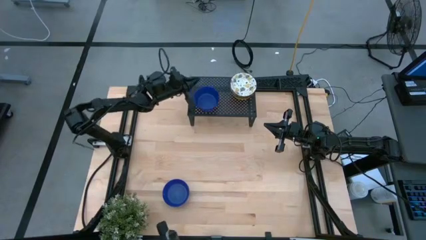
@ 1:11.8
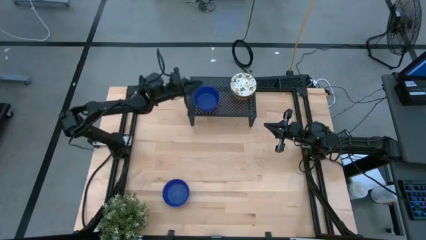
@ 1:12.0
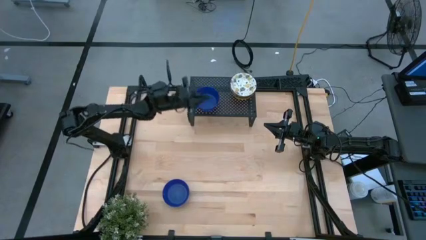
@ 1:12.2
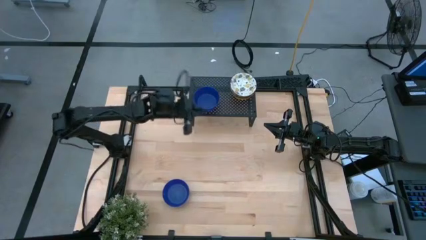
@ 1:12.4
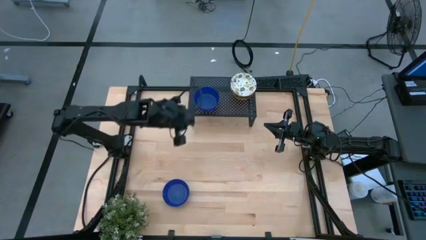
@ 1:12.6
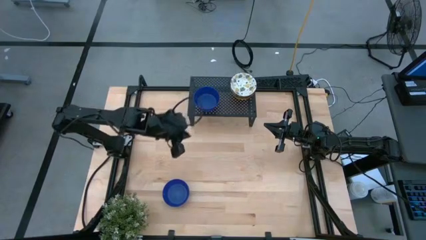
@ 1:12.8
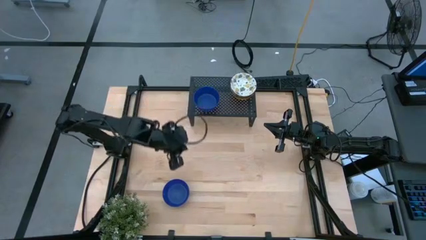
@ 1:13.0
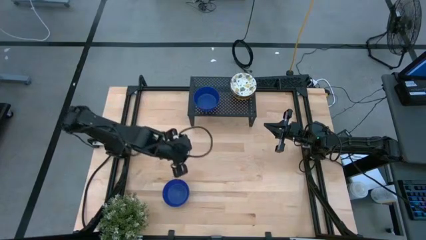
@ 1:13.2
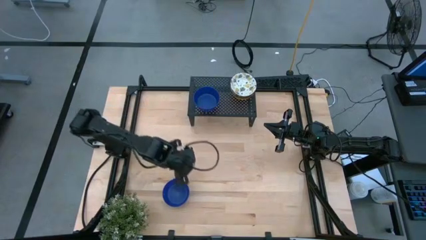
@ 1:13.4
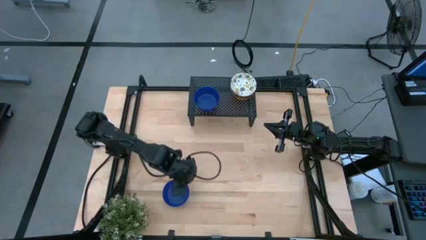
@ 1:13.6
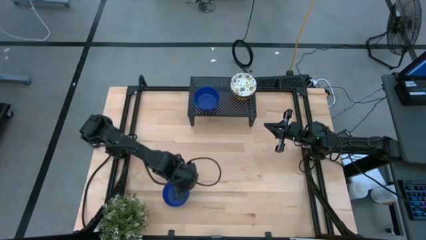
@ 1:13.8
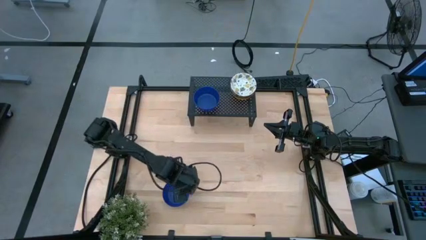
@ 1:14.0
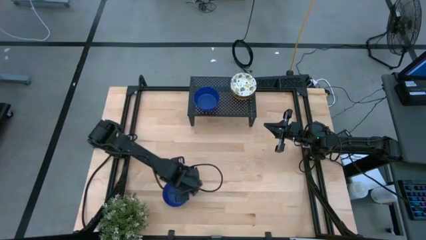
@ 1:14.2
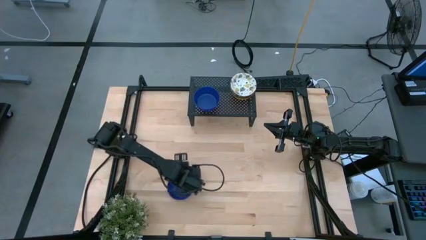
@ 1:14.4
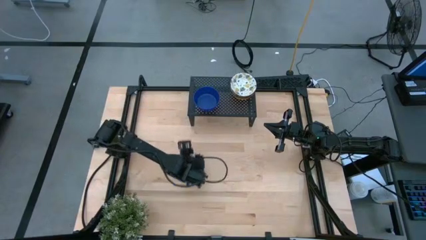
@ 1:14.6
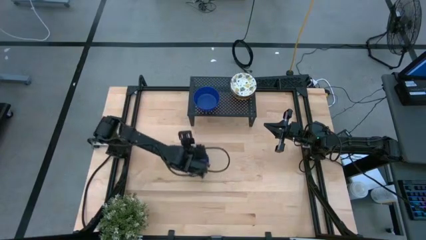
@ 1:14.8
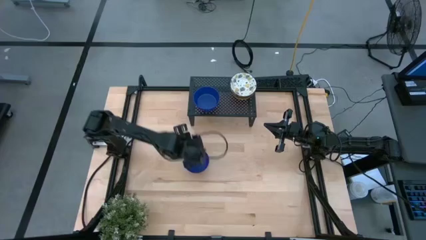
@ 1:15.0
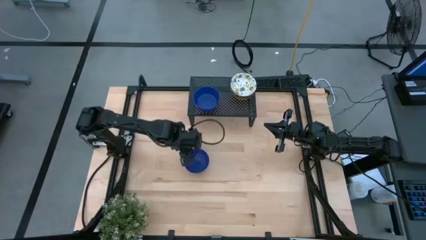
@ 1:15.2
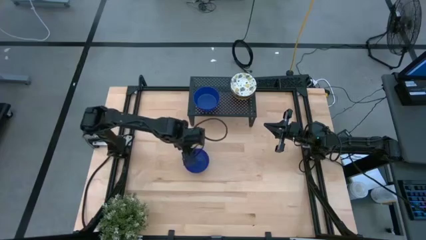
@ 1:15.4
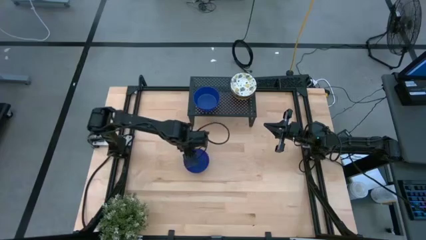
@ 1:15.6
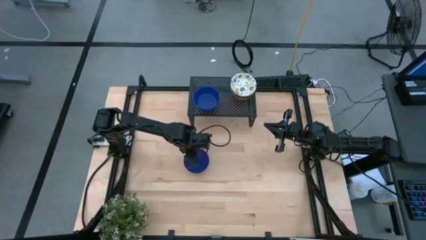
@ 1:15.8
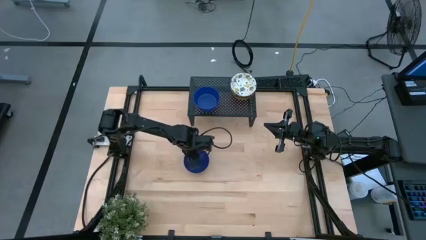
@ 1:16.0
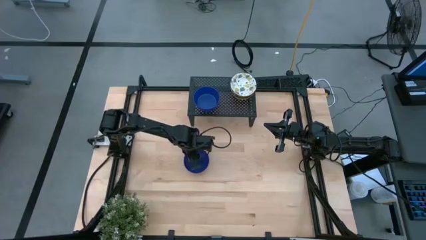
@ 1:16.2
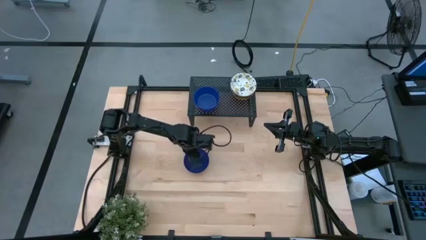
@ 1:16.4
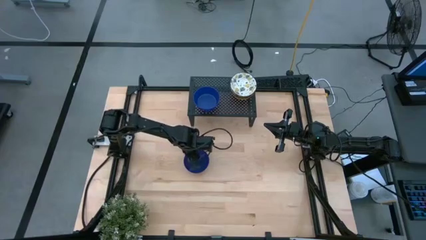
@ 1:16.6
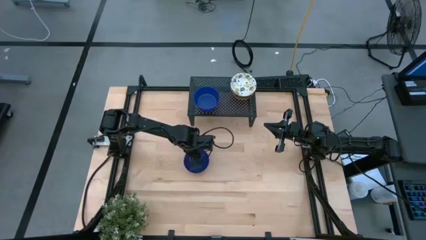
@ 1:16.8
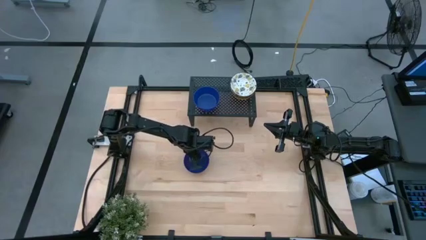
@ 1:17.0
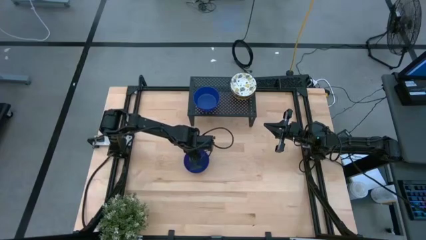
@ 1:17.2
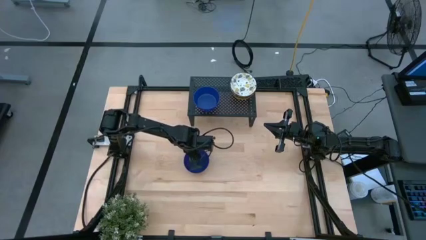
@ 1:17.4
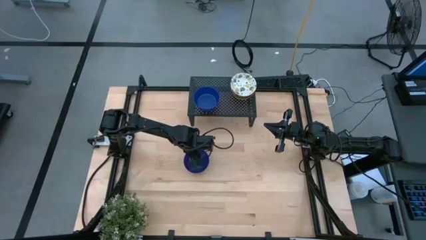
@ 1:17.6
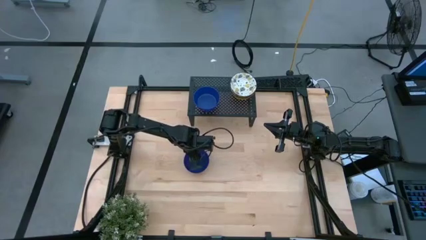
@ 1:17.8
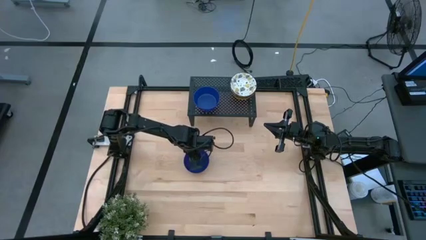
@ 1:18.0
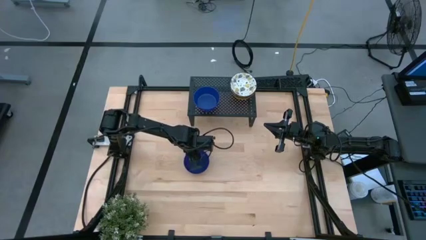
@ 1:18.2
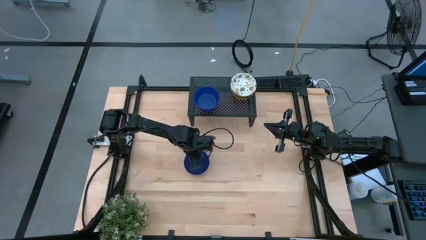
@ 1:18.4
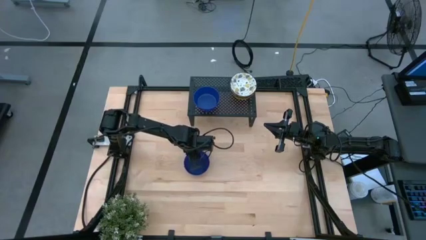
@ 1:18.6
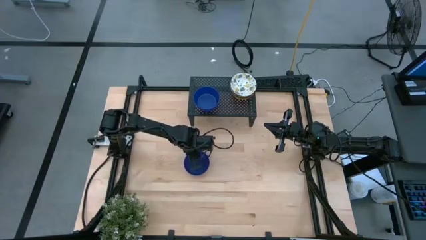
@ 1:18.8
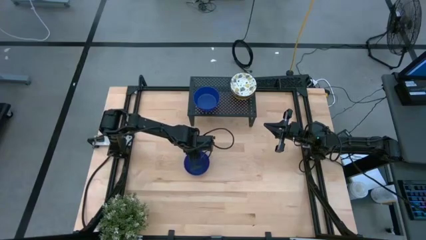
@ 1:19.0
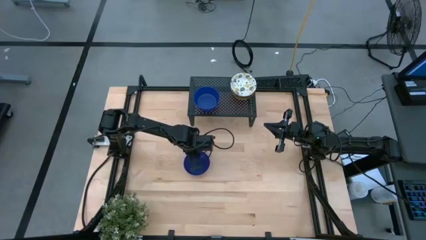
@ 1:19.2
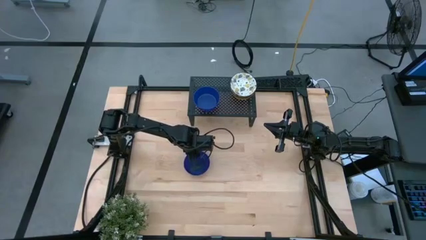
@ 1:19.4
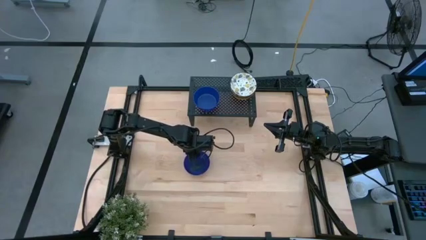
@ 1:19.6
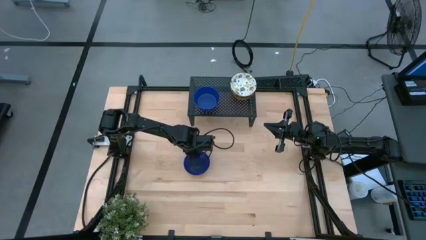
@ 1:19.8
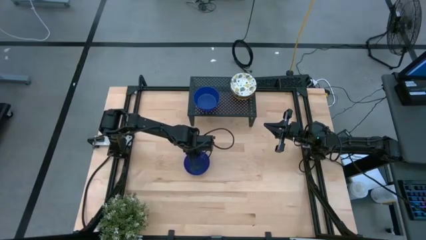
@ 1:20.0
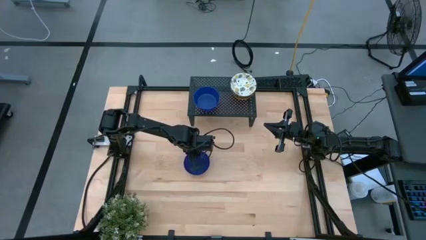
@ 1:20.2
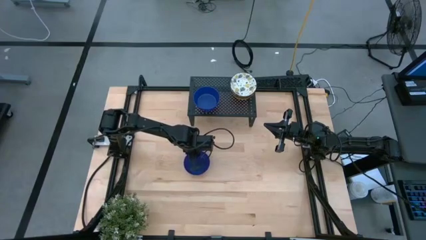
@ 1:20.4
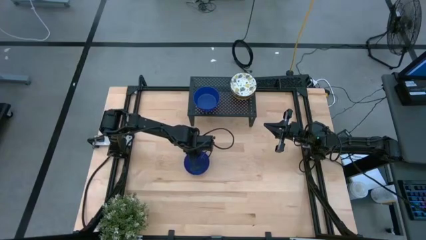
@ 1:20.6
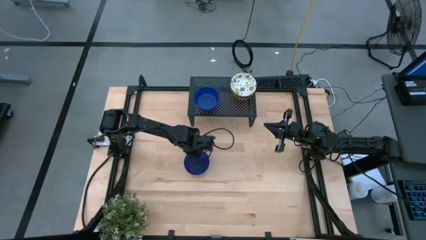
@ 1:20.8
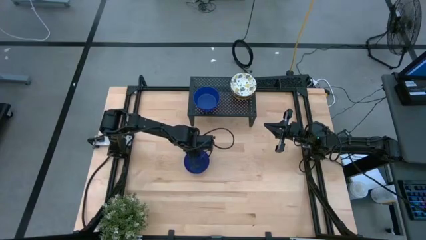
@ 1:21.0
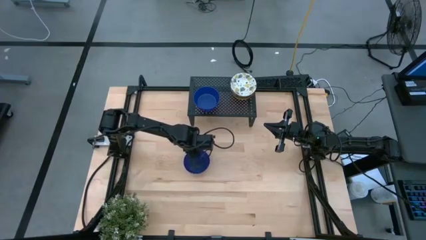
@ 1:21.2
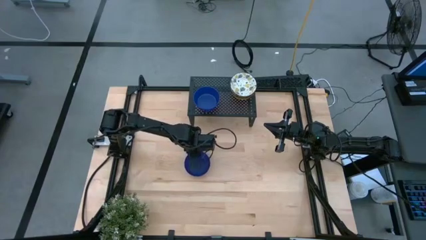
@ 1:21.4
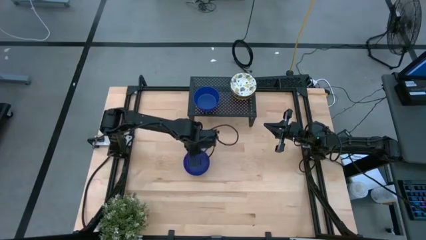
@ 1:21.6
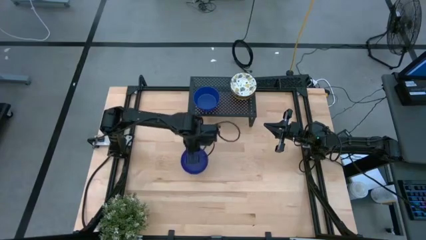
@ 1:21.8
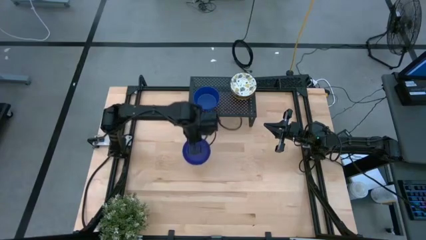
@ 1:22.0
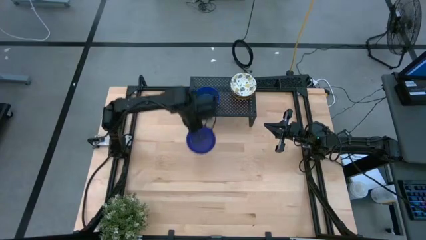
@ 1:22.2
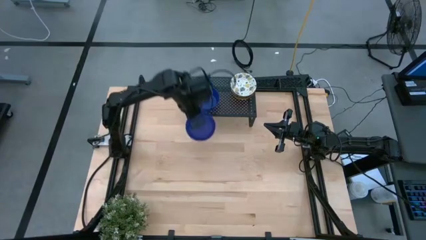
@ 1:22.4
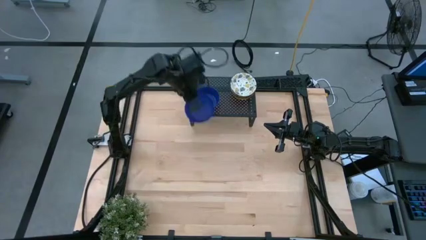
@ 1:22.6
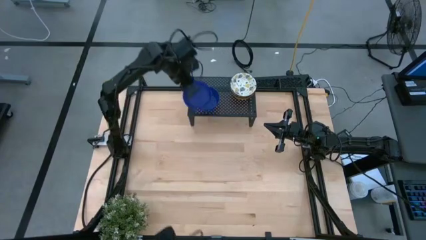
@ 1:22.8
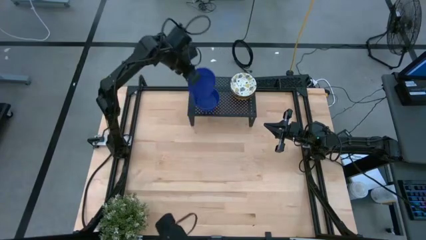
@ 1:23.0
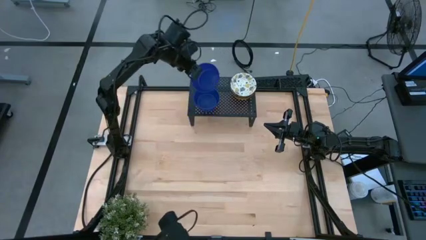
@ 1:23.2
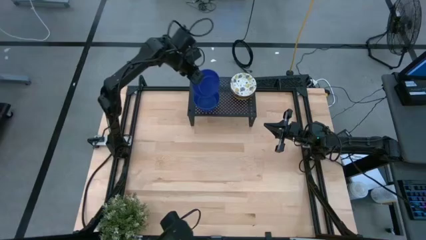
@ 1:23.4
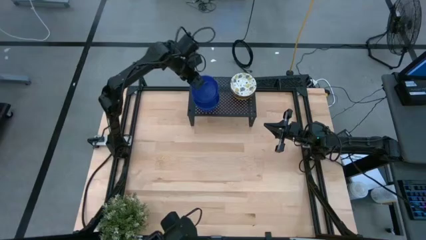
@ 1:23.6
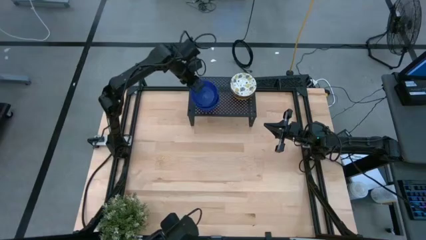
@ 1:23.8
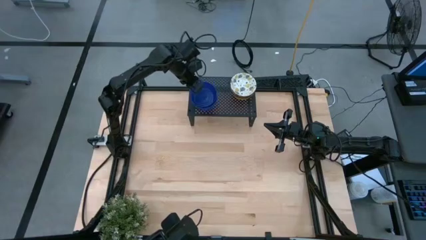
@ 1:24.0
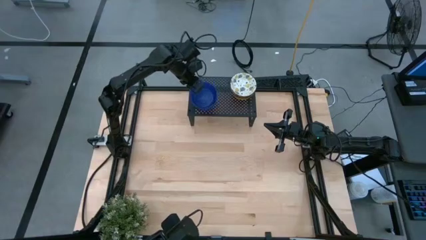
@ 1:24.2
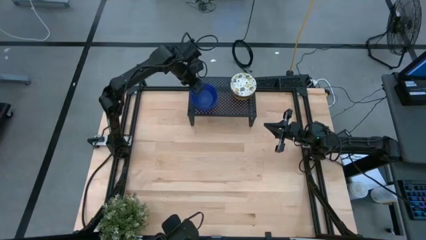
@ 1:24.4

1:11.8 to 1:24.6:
Task: Pick & Place Mini bowls
Stack the blue bowl on the blue bowl on the shelf
